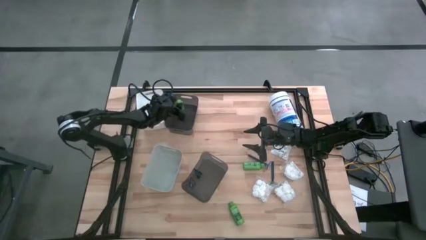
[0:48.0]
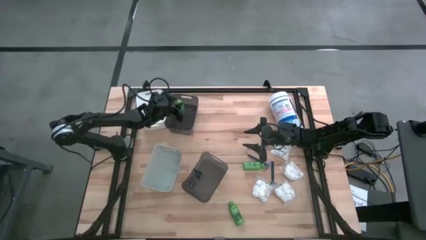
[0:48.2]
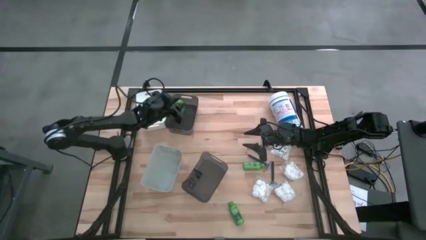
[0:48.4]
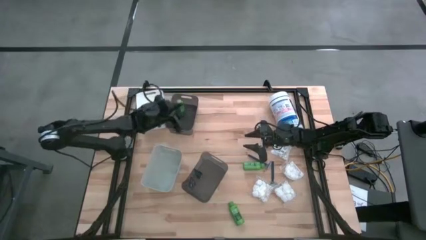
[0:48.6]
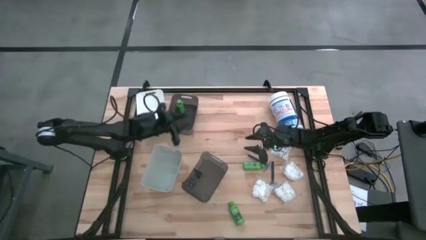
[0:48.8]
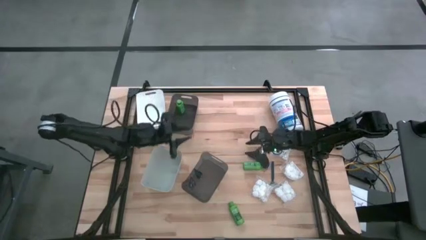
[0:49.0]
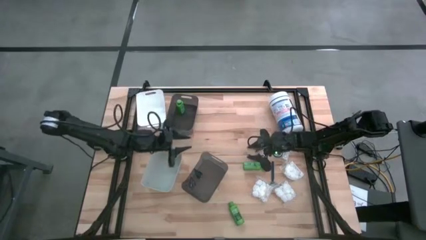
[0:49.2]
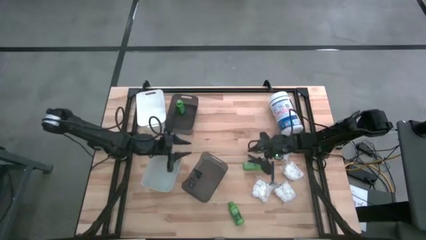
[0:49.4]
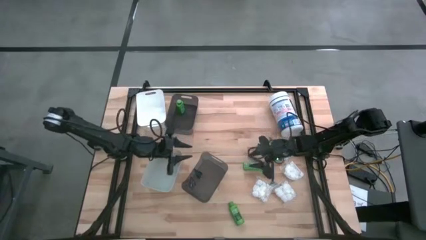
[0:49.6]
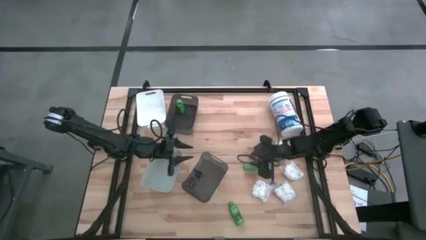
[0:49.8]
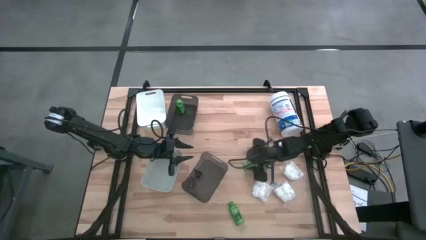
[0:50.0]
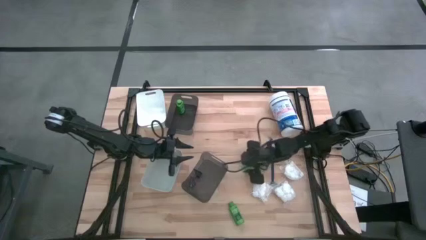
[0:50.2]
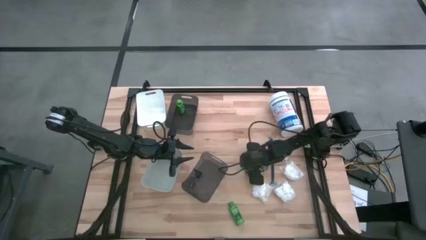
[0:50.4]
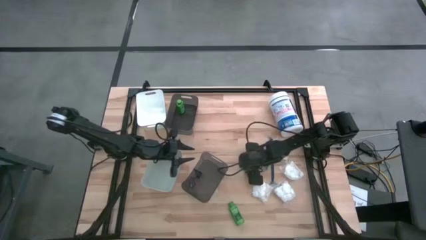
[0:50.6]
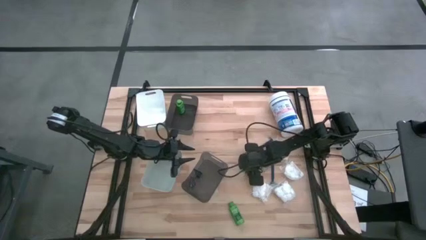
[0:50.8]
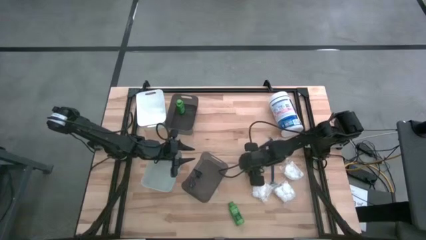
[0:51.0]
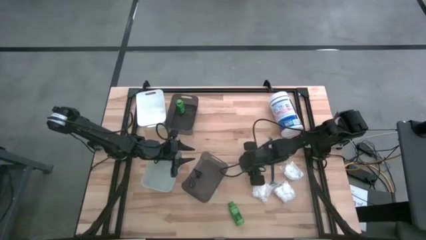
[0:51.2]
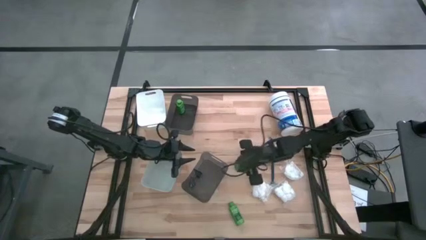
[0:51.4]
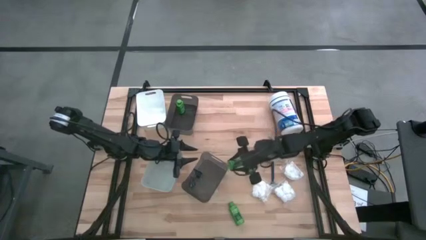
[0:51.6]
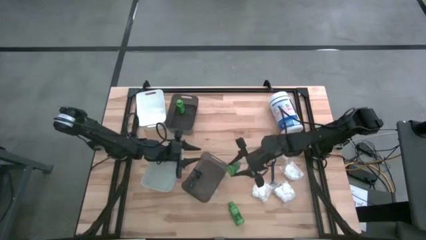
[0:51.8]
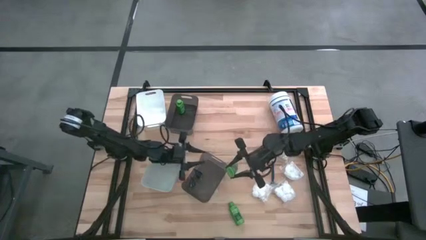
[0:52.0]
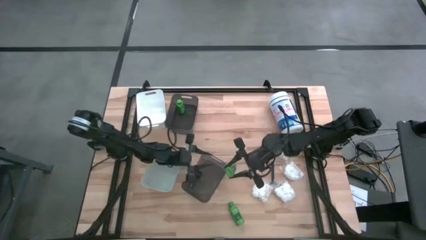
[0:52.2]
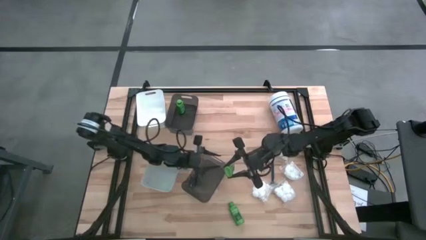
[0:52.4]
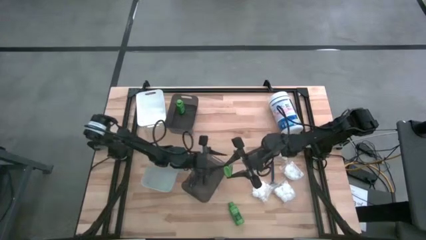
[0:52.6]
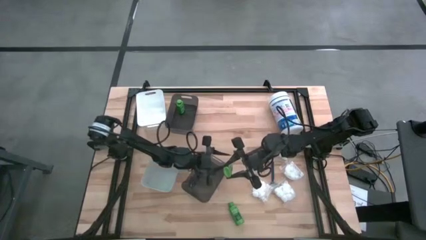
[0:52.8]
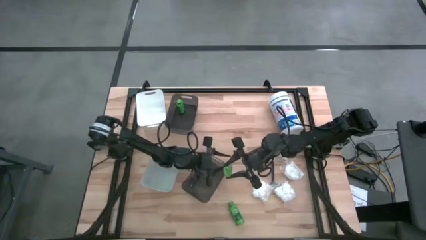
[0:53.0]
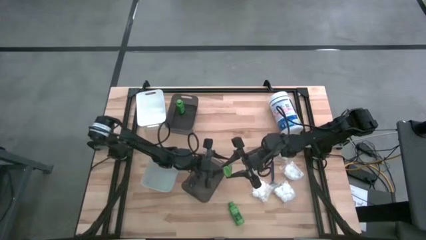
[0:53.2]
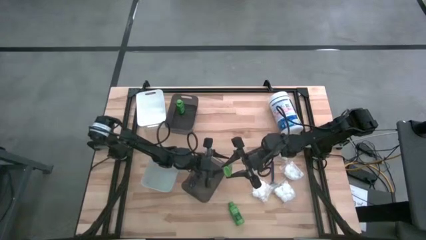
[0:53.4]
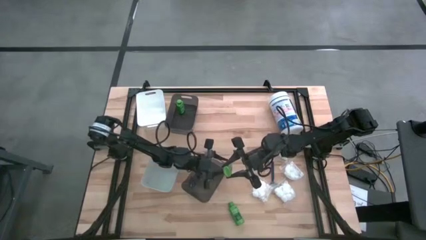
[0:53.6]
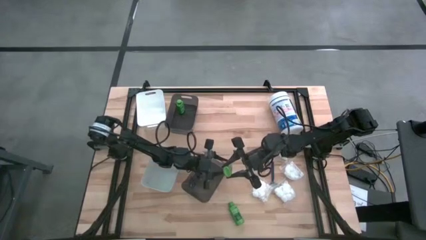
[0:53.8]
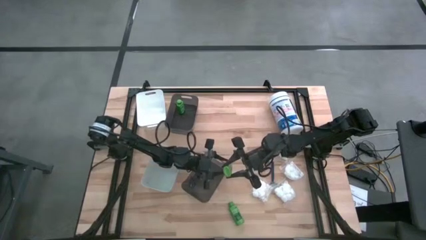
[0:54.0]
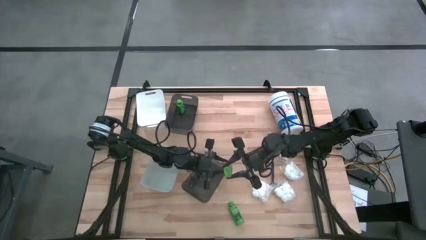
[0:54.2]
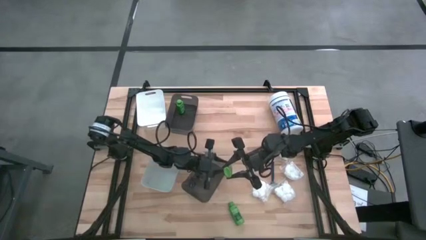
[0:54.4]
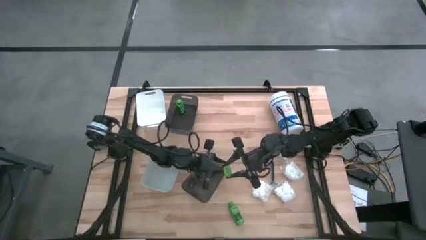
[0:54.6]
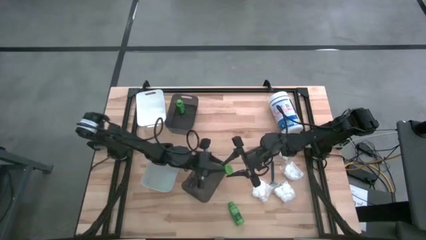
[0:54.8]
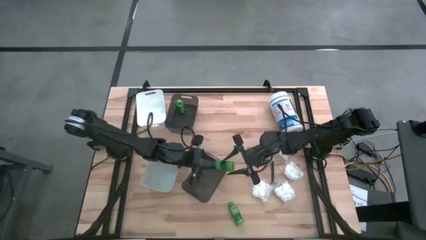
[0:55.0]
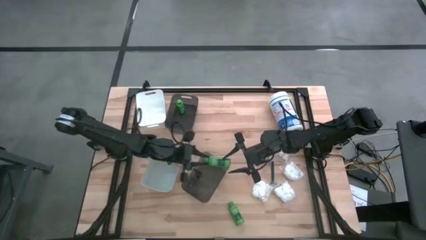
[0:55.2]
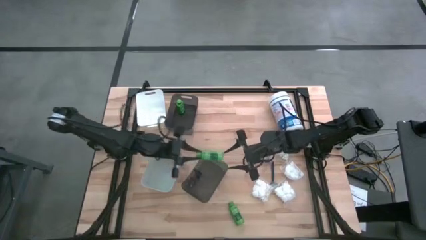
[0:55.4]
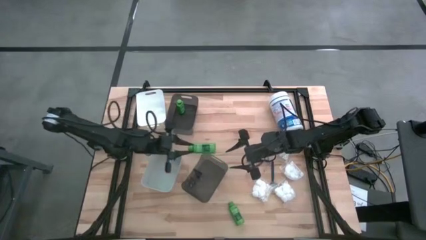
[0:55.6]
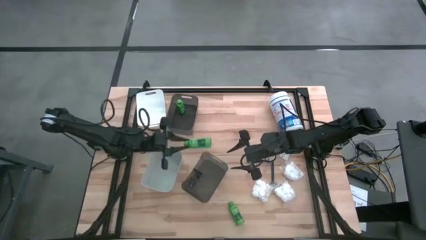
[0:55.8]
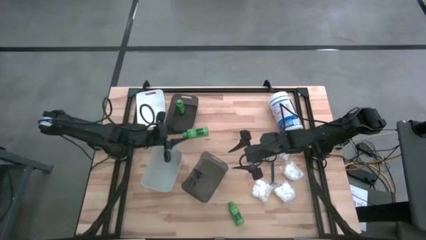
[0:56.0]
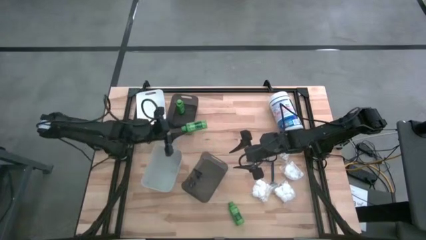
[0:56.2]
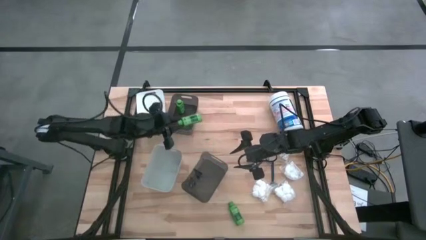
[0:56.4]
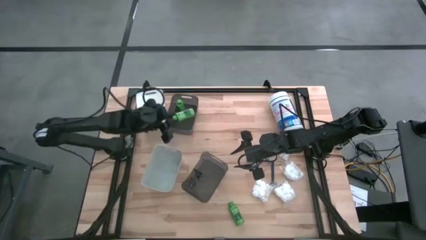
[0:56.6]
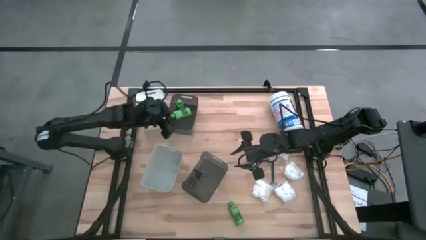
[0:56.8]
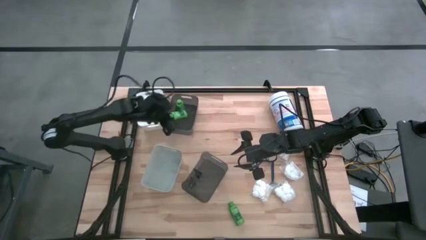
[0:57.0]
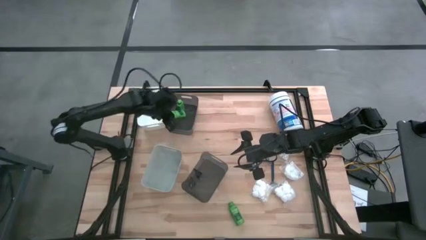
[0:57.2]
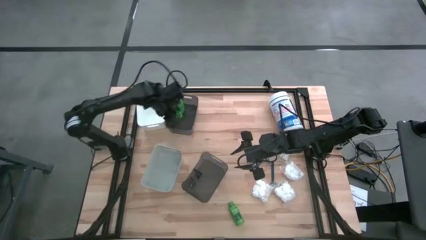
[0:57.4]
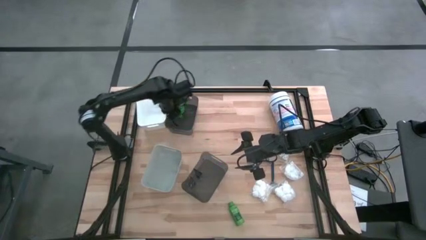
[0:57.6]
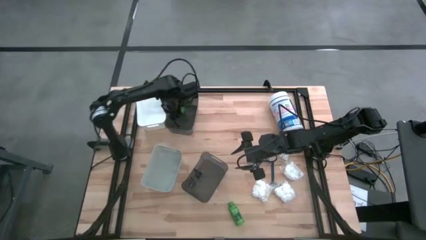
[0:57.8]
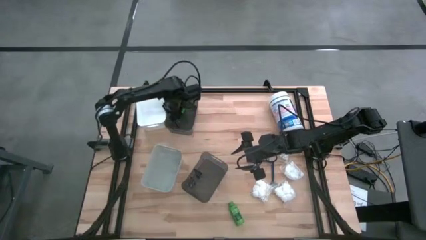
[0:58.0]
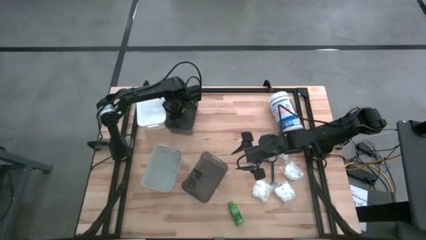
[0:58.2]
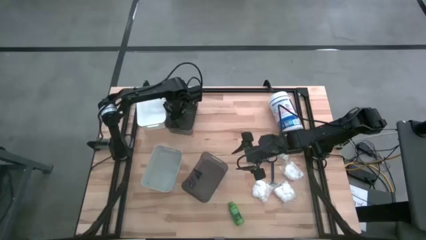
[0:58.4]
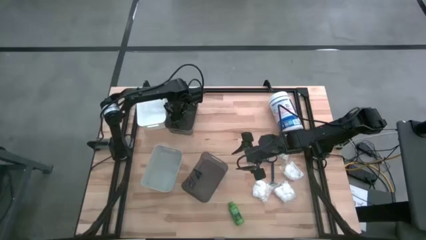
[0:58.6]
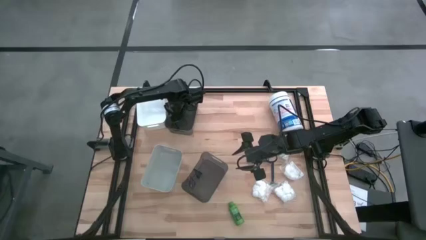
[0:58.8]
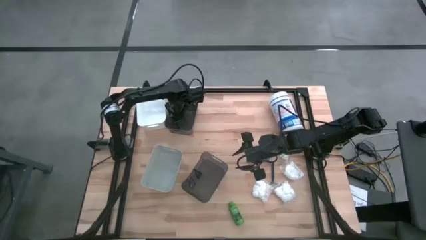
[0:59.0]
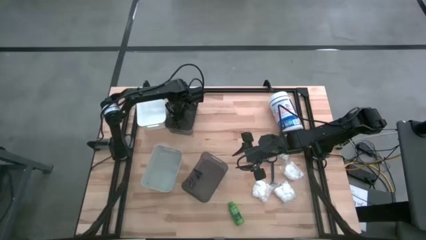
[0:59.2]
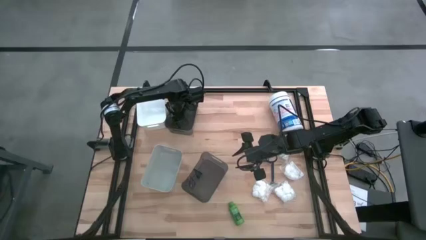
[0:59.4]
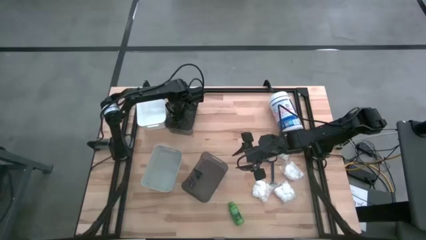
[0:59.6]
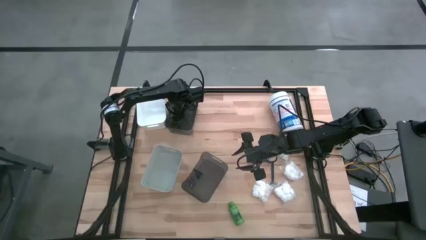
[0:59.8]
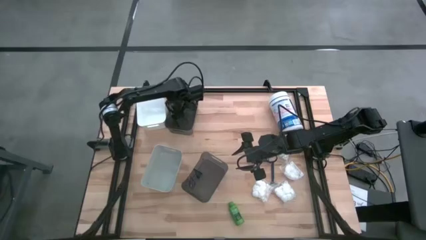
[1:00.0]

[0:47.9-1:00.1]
Task: Pick & Place Travel size toiletries
Put the top green shampoo into the top black transparent bin

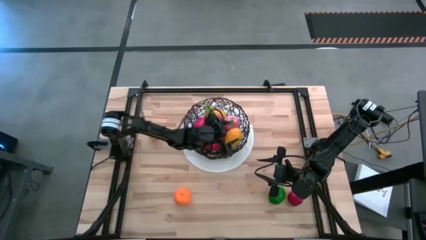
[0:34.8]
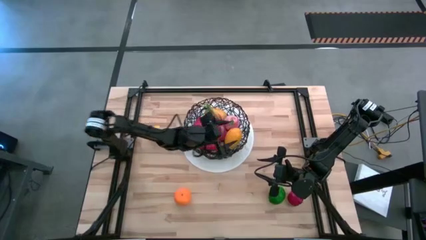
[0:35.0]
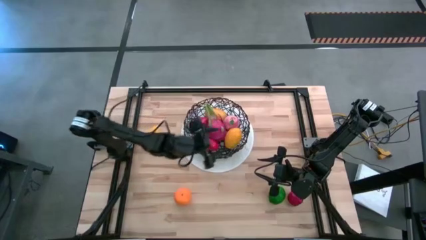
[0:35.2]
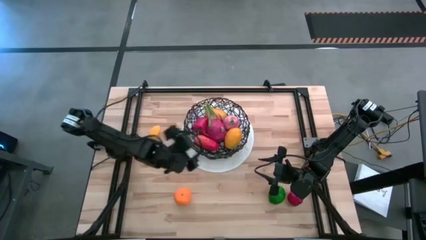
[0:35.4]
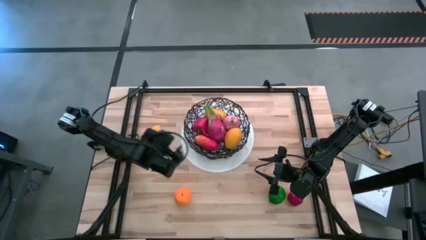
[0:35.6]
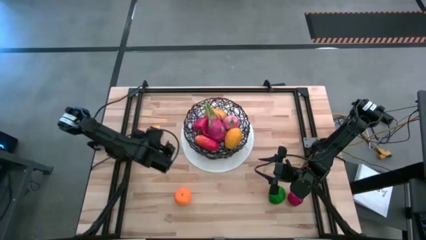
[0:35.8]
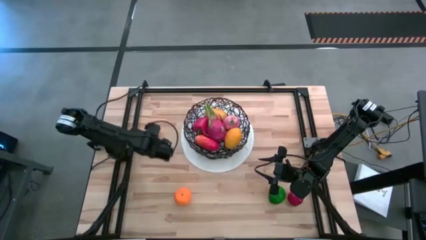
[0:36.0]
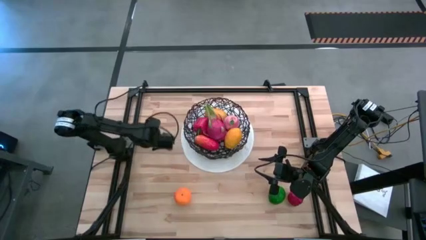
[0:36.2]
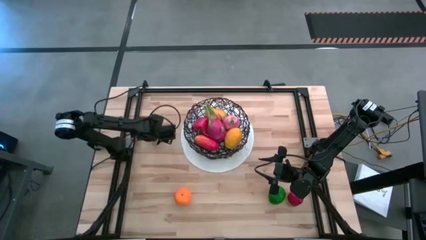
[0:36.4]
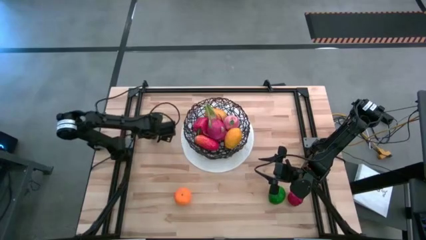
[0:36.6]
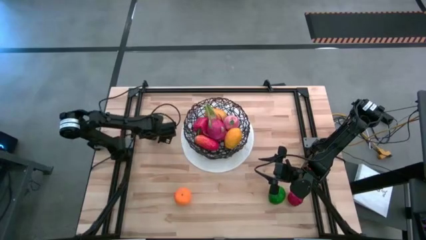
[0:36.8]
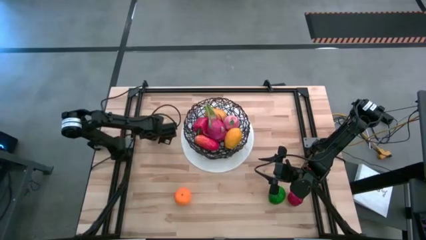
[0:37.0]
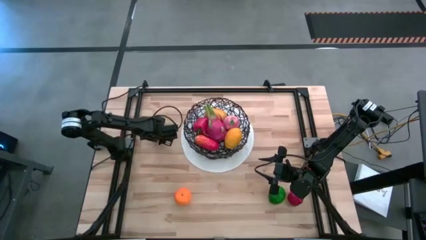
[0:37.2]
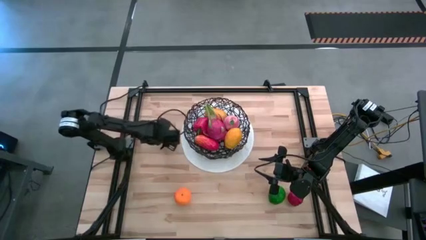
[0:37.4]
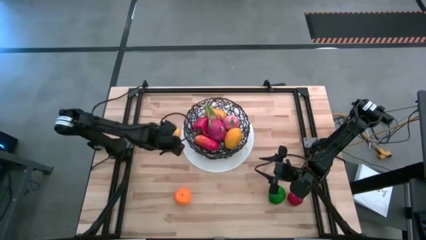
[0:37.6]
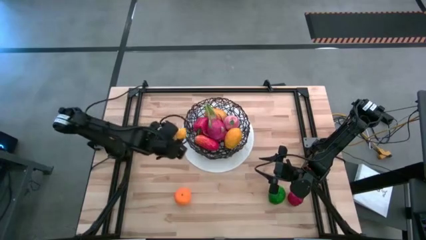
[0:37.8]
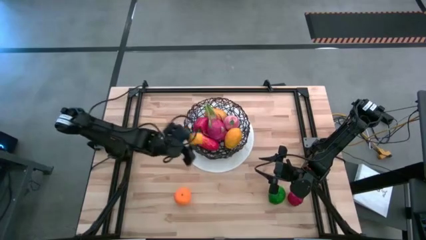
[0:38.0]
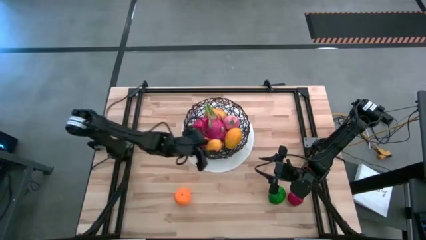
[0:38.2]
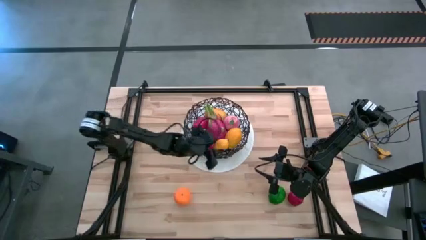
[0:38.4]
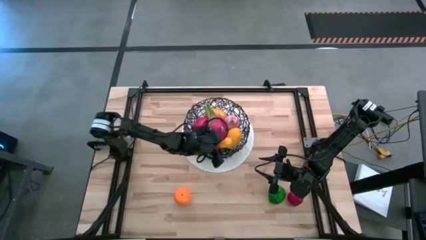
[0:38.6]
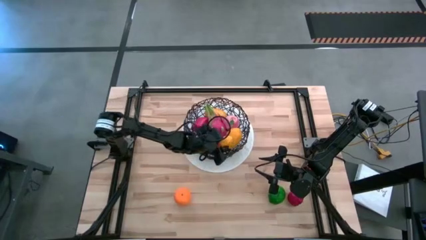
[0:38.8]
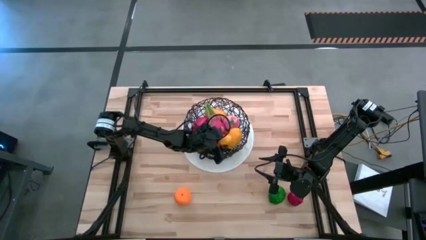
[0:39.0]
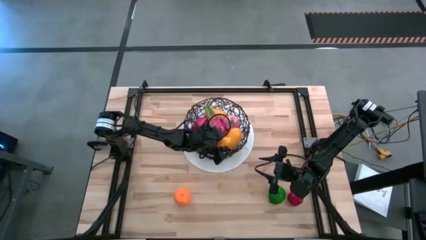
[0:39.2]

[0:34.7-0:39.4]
Task: Build produce basket
Put the lemon into the wire basket

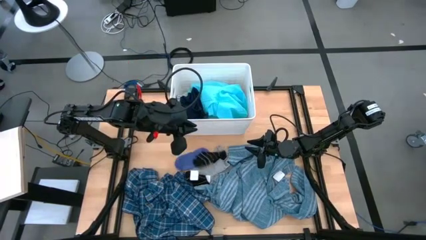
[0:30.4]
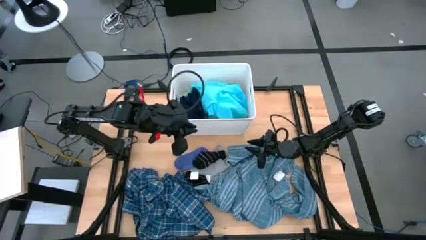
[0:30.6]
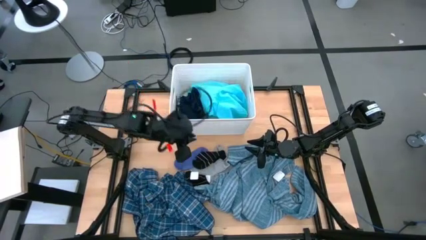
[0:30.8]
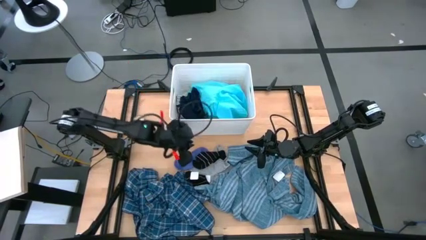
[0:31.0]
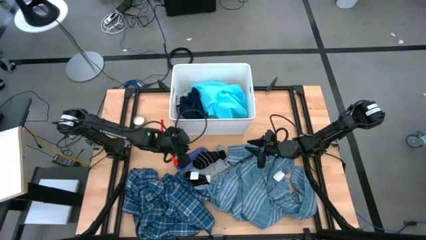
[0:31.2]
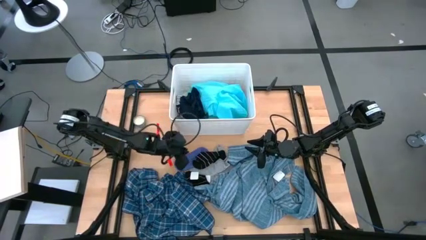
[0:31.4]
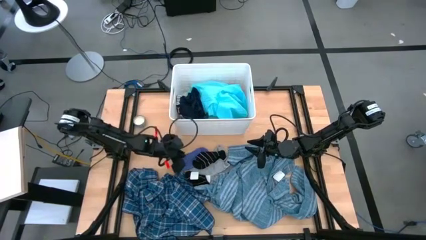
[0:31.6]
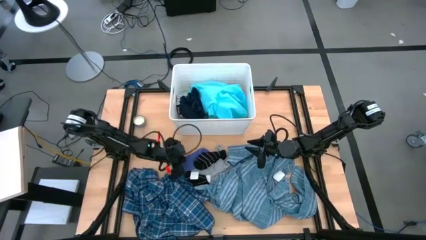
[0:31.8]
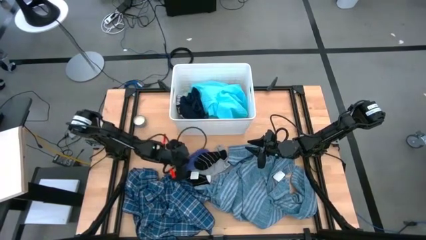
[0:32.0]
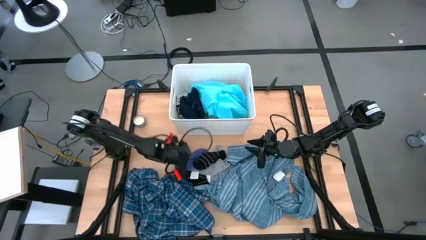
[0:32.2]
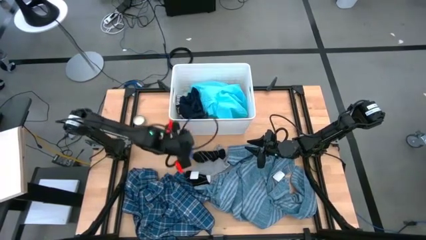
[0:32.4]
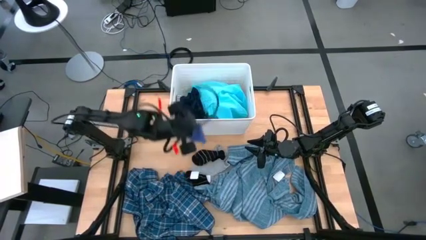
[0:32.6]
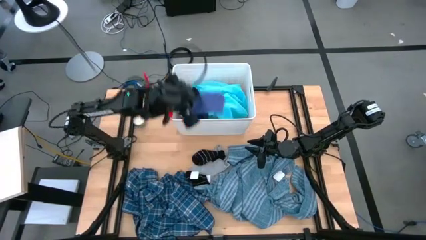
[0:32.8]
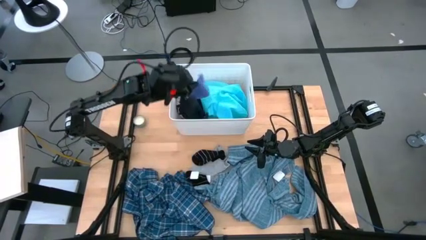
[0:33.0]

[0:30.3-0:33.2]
Task: Sort clothes
Put the blue sock into the white bin
